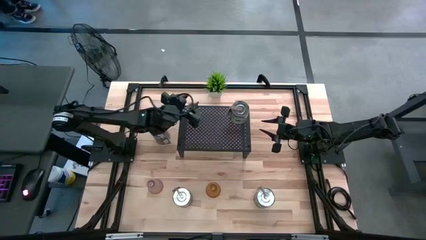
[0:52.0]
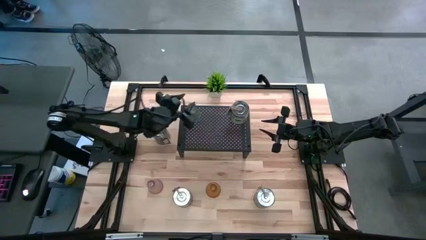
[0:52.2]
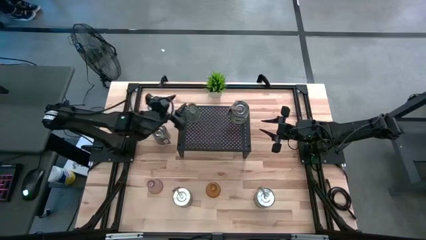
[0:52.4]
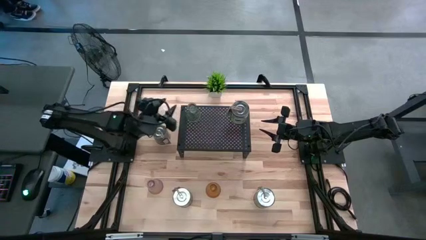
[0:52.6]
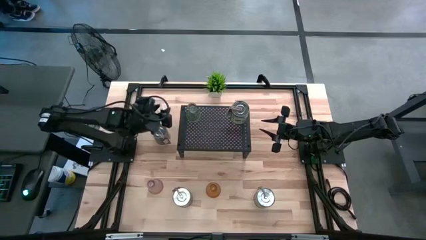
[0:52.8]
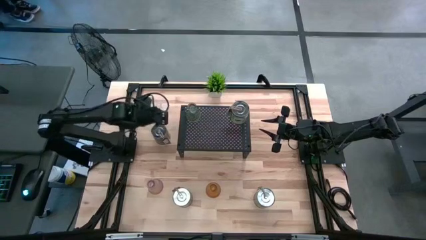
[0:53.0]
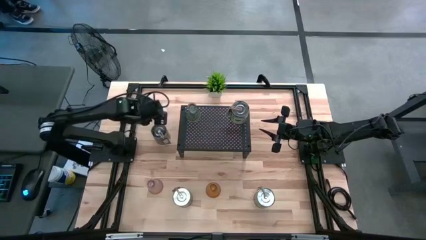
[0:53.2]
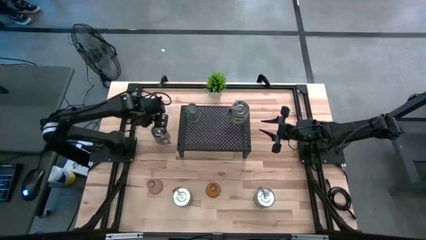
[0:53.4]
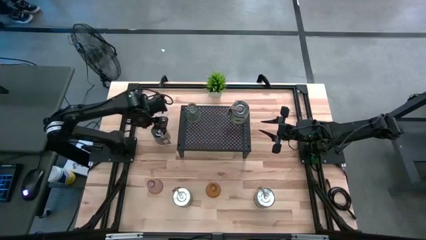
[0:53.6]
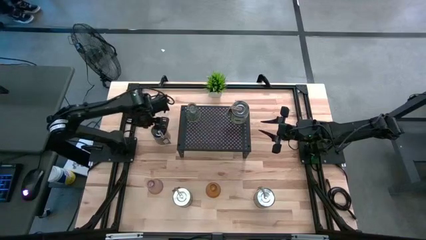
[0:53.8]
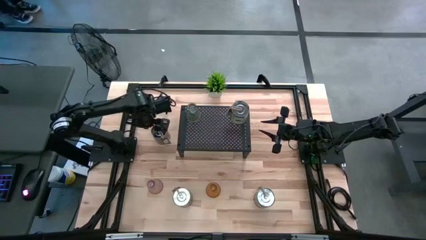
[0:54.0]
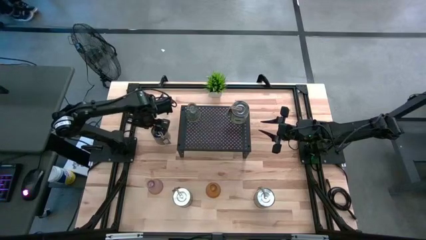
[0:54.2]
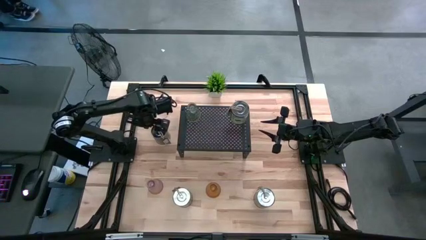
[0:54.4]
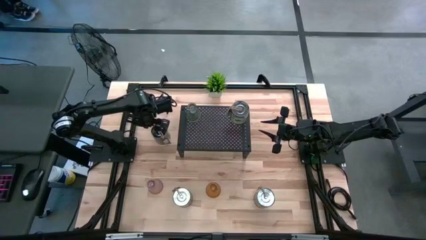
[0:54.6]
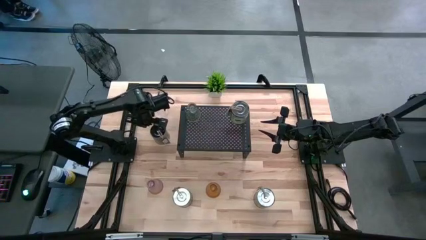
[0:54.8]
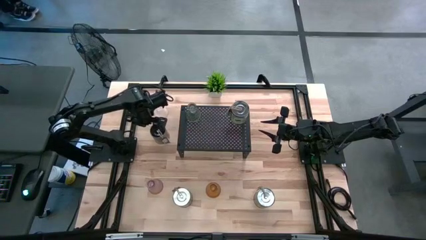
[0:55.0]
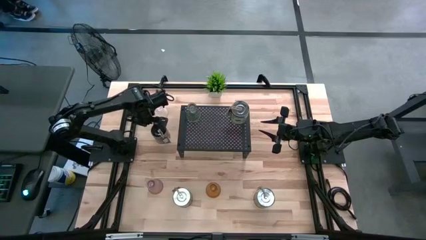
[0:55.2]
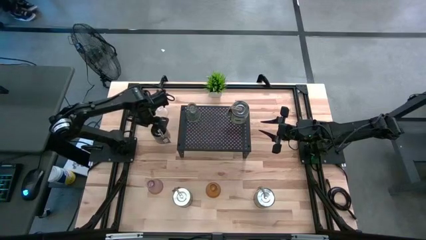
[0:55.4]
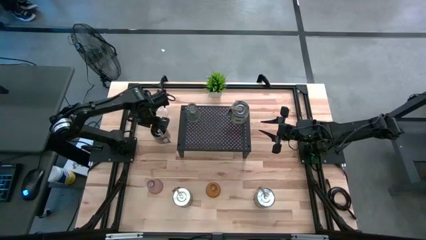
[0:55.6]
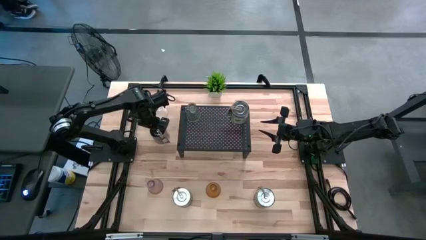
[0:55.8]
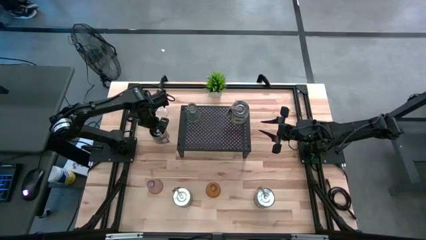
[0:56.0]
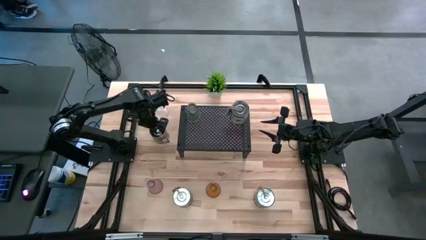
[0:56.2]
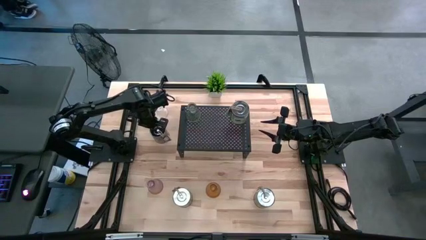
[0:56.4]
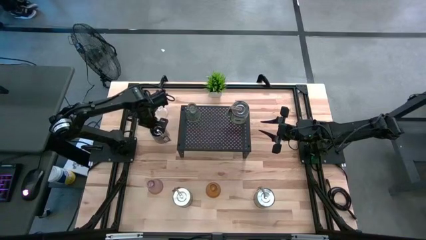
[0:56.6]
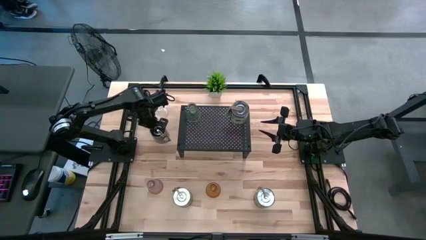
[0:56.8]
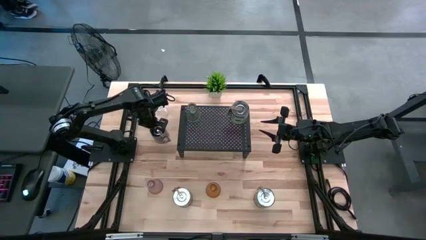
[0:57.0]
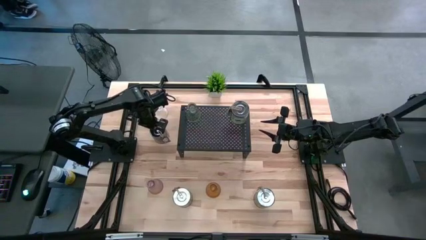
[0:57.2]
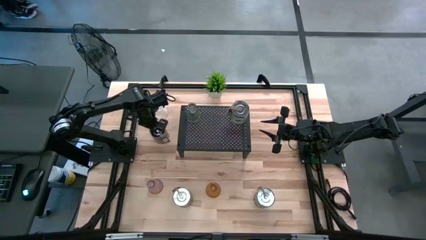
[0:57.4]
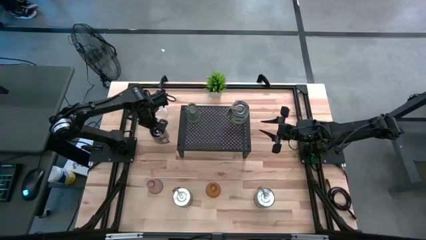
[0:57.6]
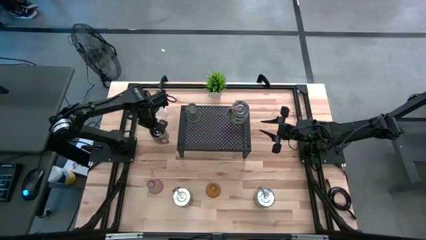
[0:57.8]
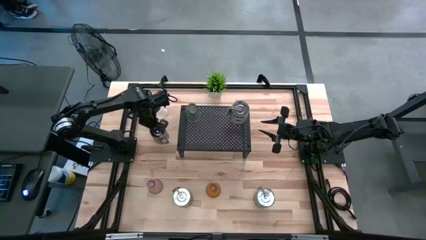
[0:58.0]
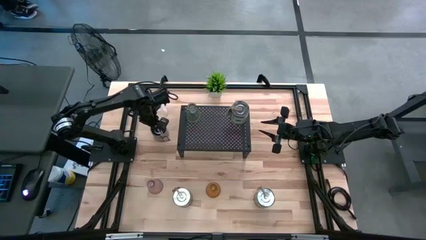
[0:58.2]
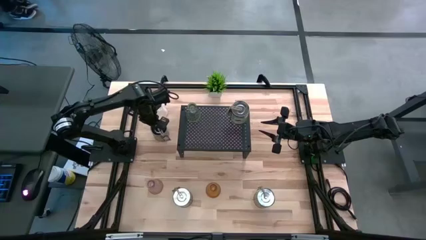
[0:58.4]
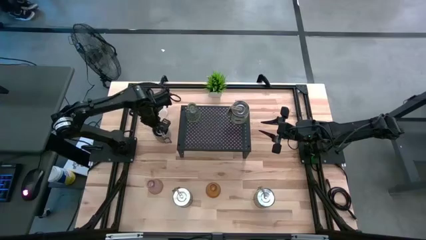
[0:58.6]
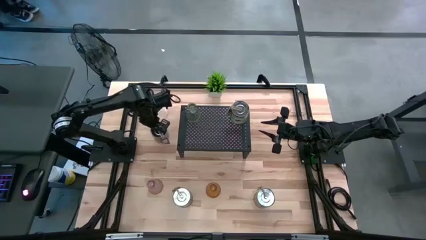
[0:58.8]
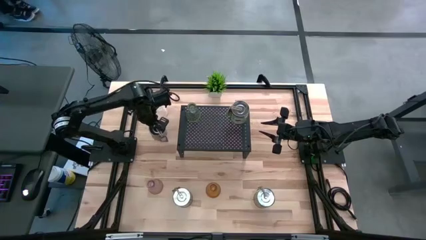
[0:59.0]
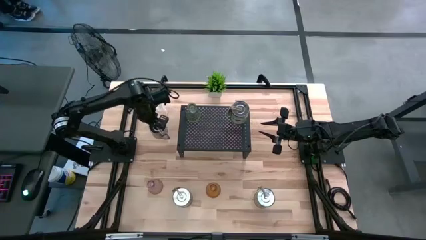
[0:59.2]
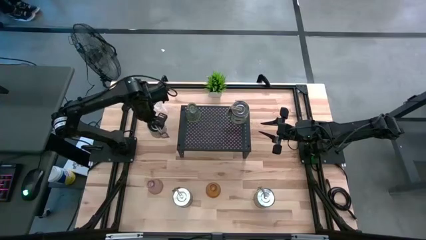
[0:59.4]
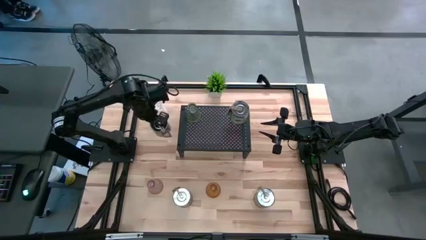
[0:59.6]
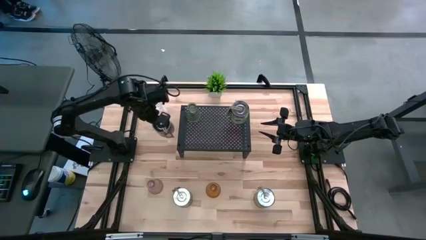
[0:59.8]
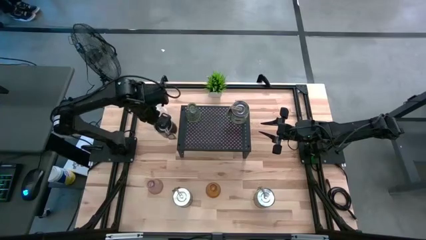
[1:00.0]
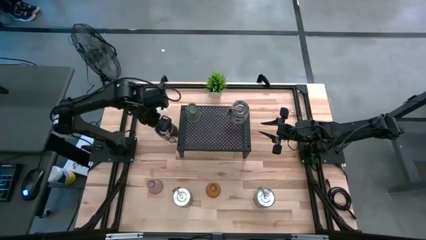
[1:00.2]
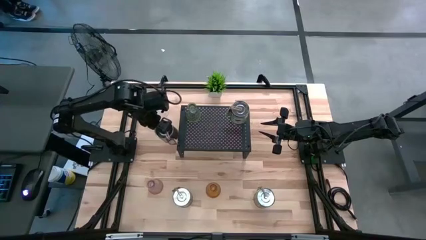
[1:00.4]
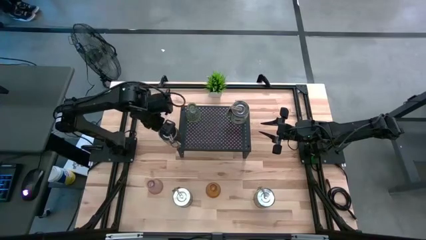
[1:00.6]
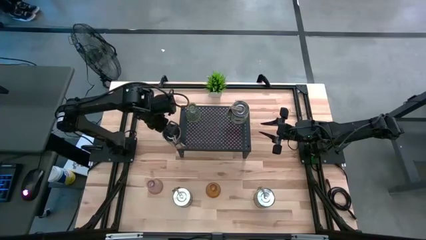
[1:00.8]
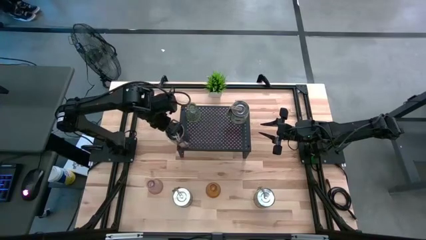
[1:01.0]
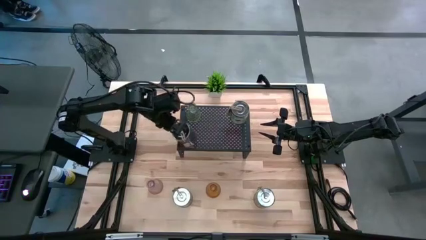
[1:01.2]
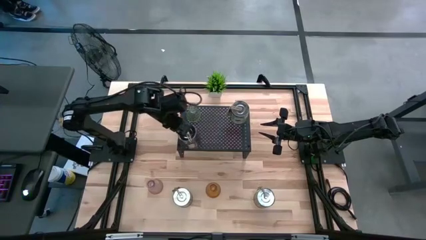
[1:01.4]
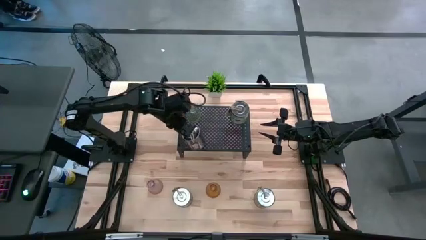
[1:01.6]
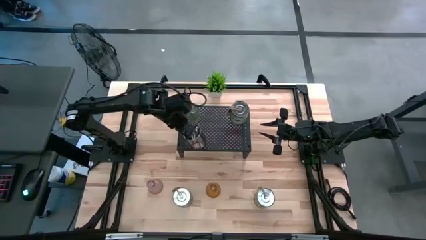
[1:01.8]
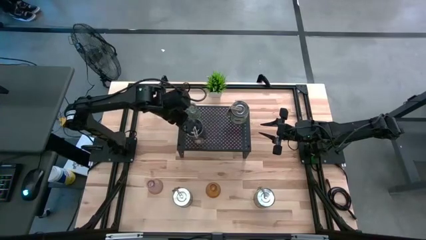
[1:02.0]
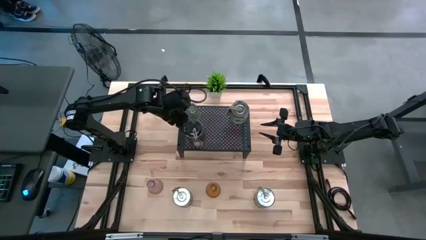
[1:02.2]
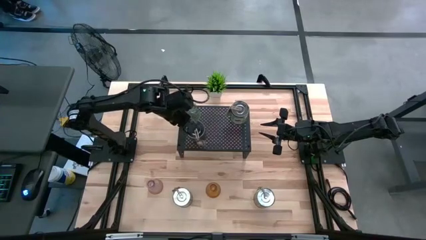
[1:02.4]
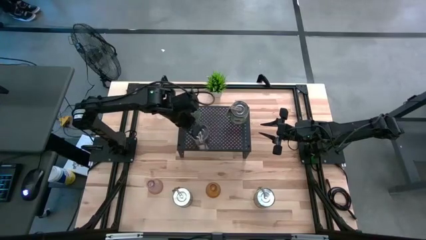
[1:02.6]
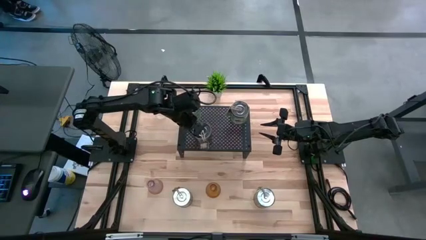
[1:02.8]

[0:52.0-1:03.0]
Task: Pick & Place candle stick holders
Put the orange scented candle on the shelf

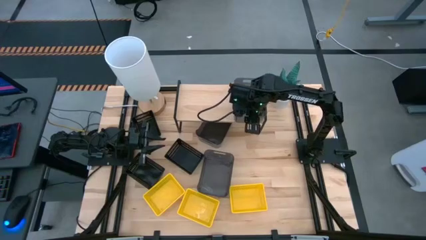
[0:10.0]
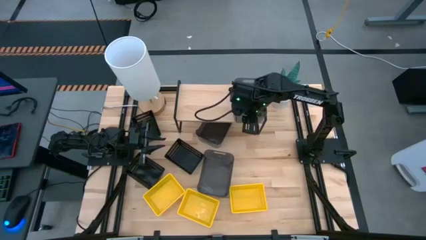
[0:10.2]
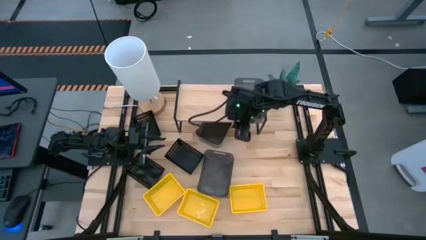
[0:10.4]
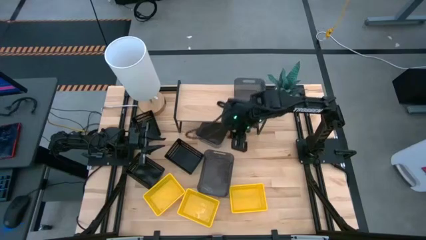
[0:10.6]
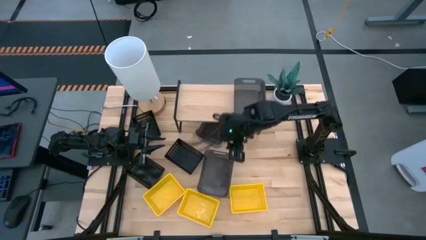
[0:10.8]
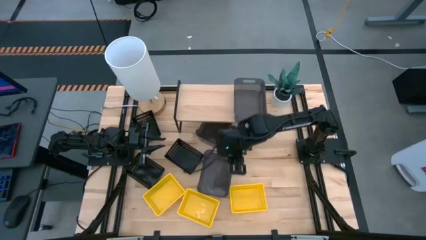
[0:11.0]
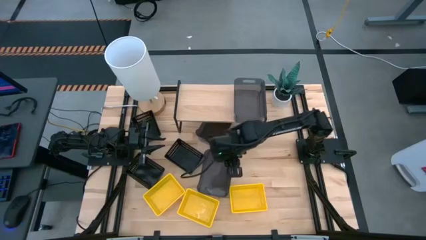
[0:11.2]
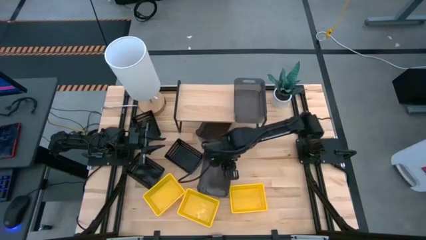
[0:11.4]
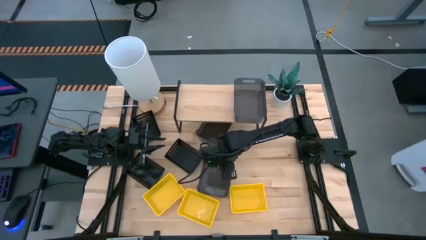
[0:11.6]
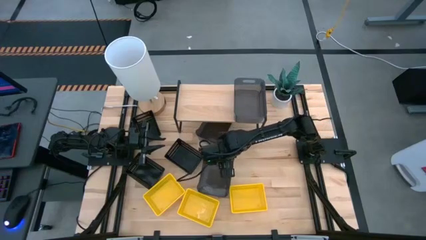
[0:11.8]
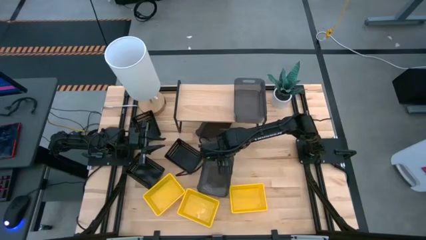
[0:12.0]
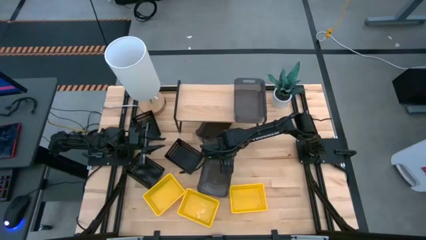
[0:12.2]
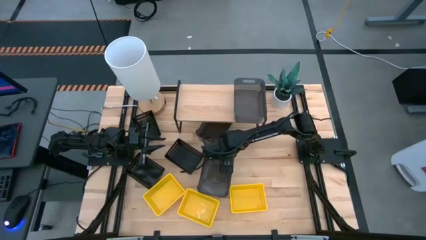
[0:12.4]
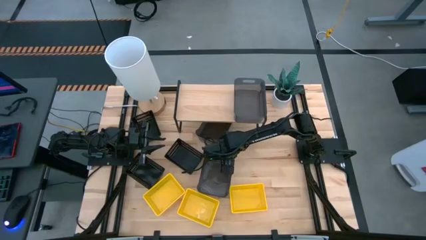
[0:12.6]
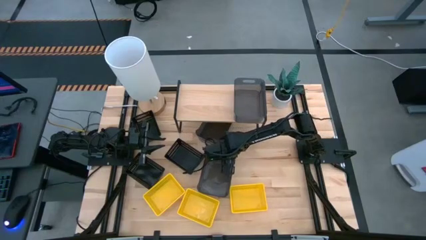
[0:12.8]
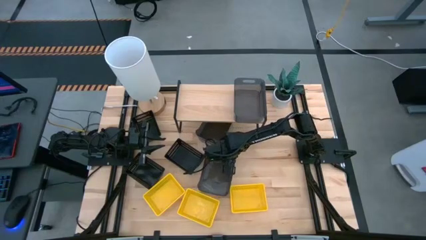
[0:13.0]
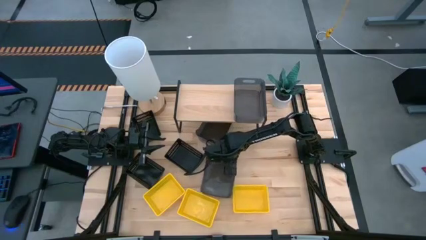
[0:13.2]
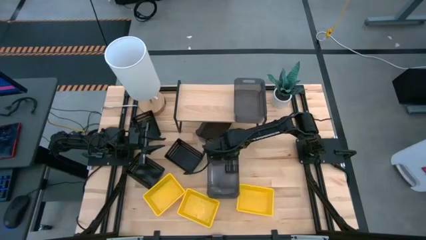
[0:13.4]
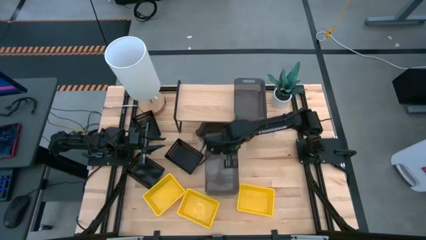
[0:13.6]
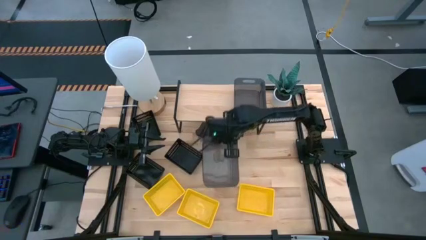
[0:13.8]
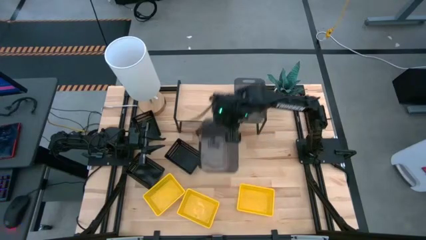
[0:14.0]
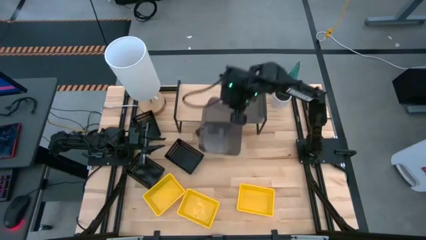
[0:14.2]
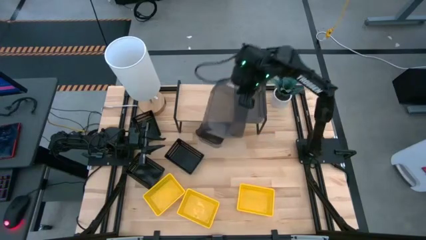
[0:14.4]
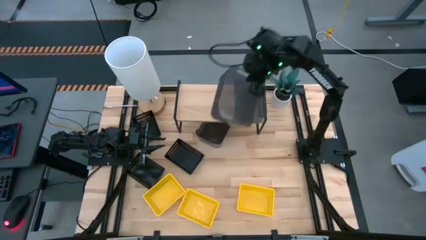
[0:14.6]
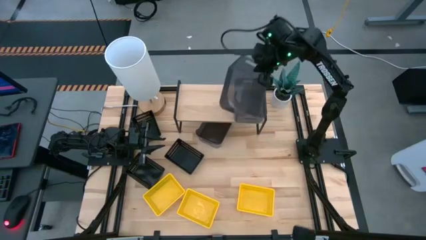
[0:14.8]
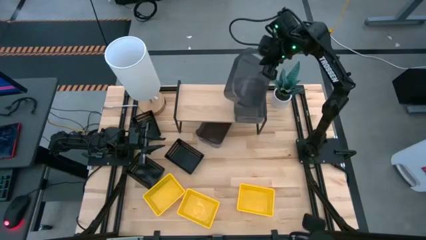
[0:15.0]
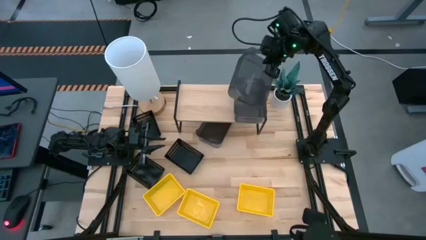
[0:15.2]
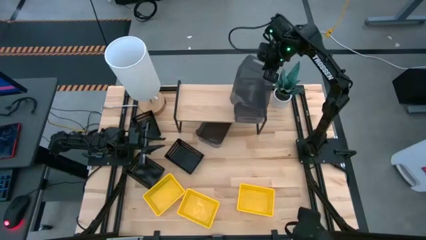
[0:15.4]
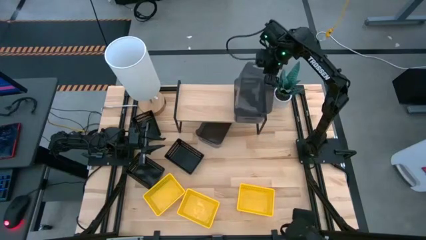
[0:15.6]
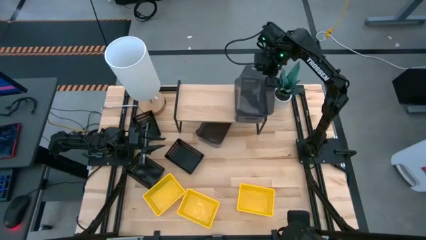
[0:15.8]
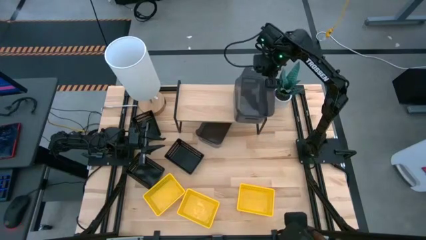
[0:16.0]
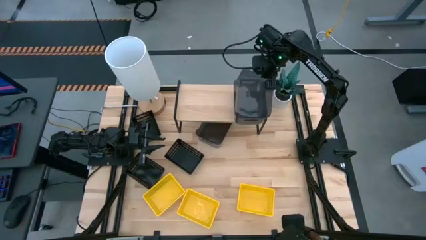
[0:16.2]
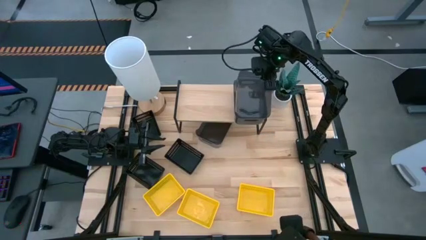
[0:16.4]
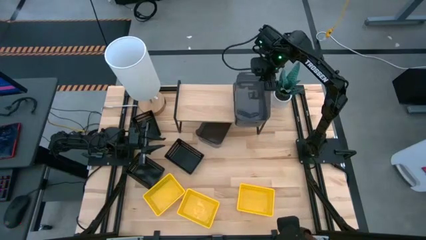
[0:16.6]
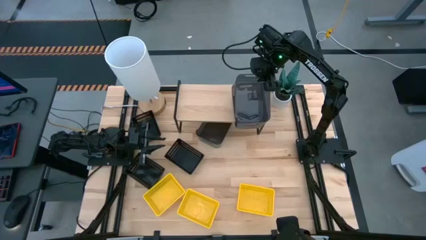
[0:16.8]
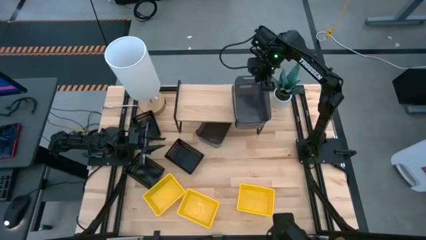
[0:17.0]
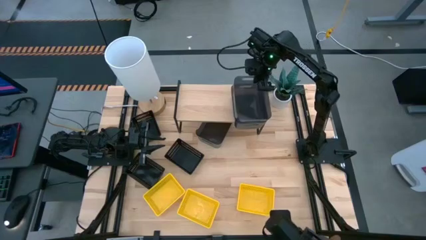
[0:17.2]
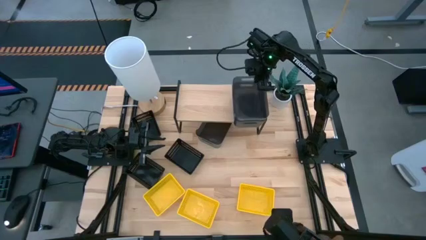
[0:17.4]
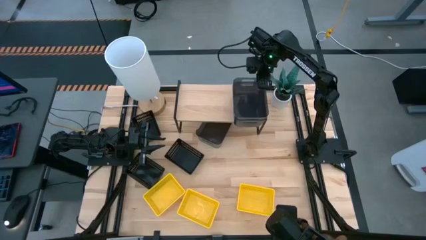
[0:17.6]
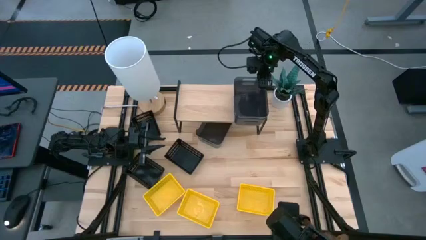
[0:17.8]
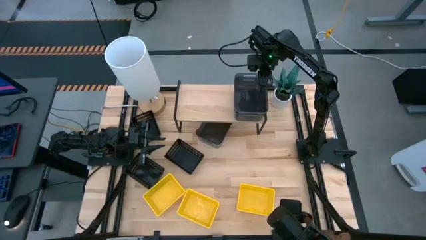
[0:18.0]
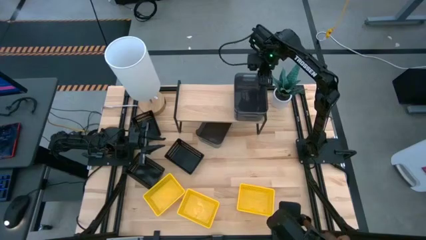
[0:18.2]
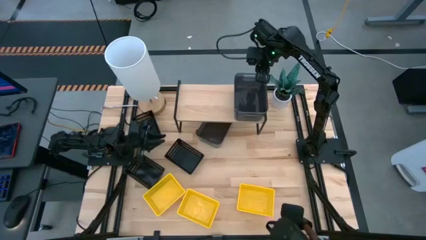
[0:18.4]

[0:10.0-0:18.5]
Task: Stack baskets on shelf by color
Stack the bottom black bin on top of the black bin on the shelf
